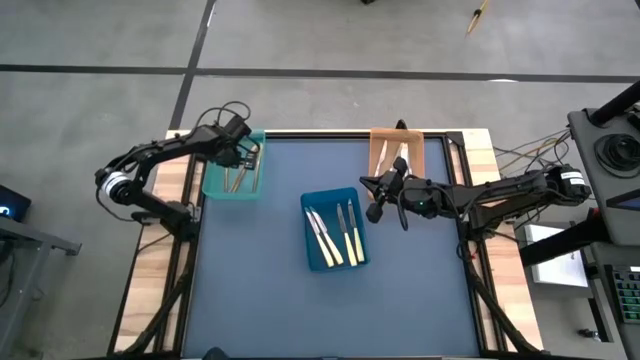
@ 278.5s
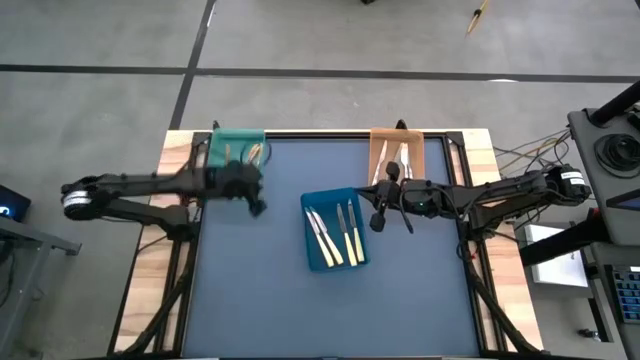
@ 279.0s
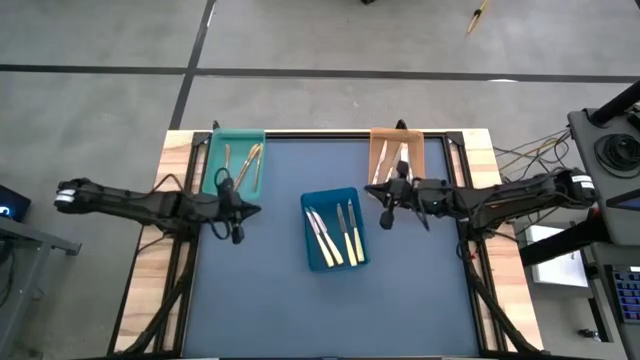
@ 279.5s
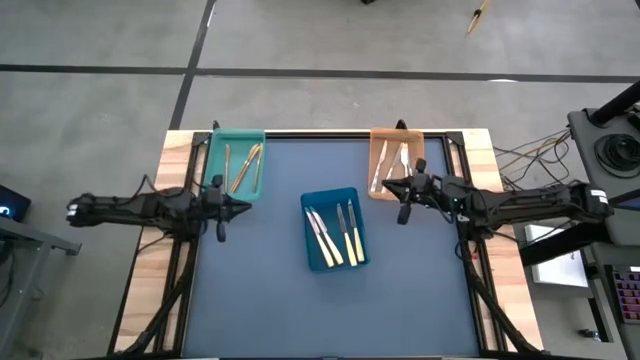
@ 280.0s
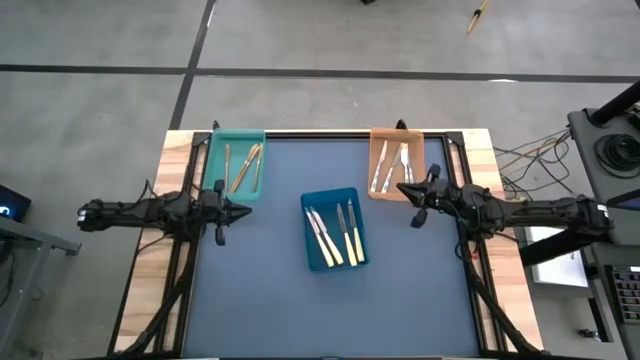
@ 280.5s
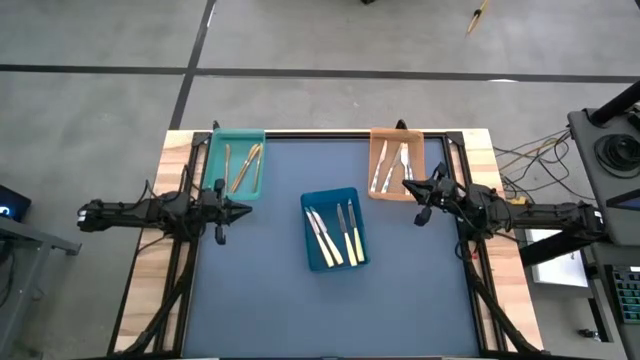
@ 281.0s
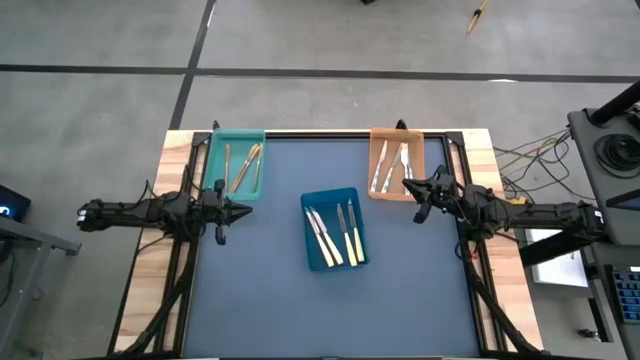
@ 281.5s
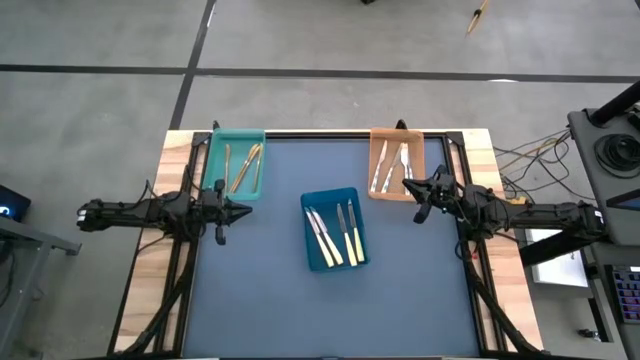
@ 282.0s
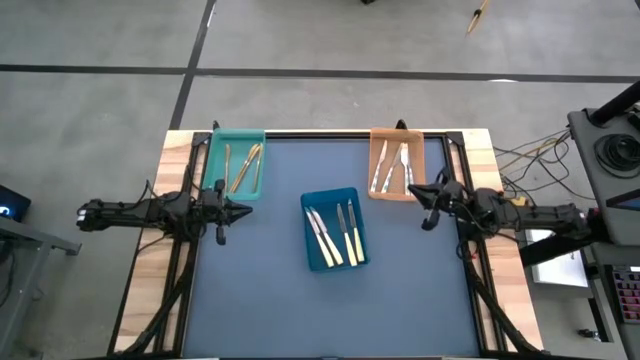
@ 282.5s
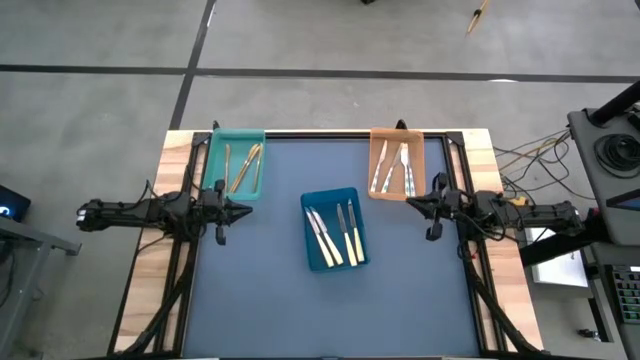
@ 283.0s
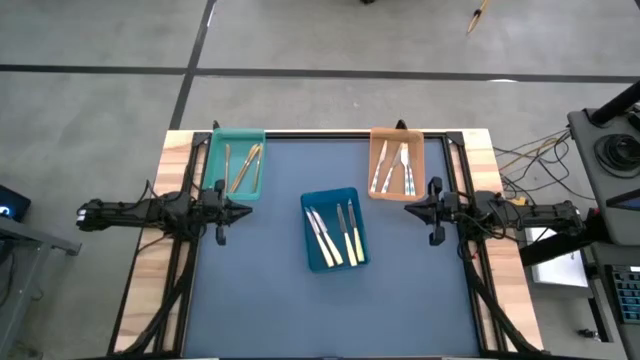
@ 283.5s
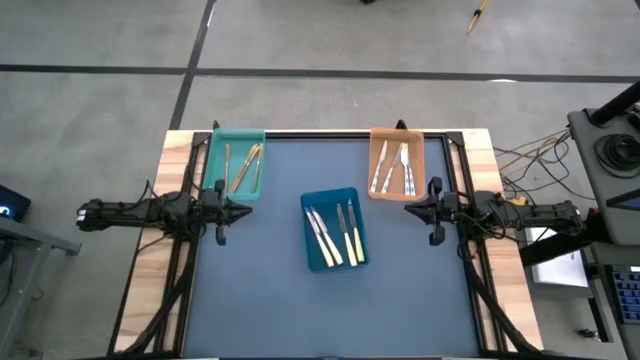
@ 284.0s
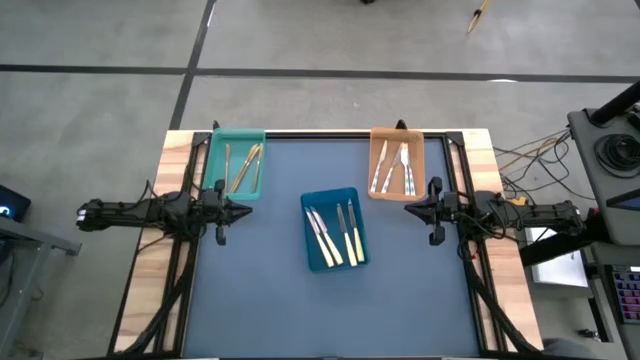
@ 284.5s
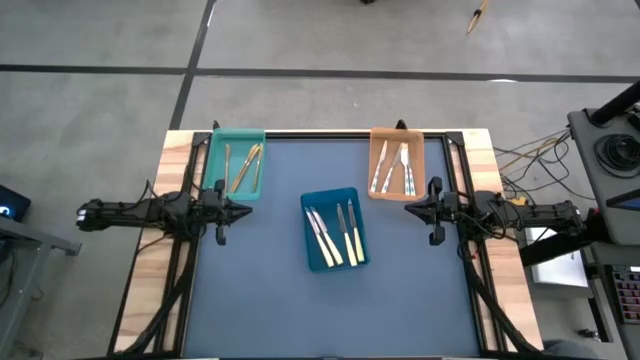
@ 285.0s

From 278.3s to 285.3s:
Task: Sort silverware by color (type)
Return to Home Position

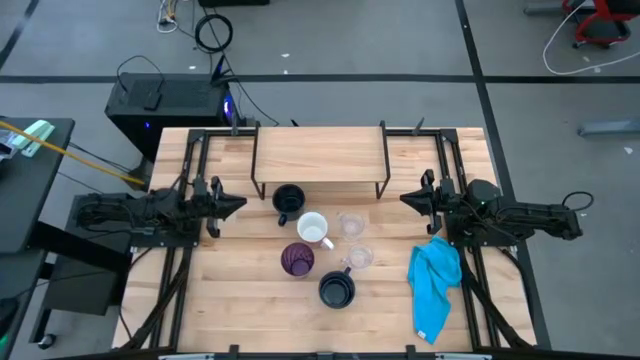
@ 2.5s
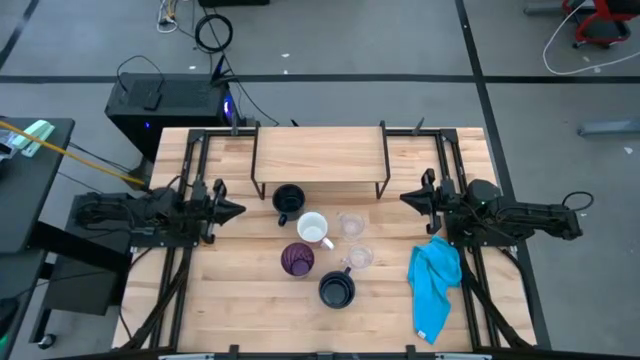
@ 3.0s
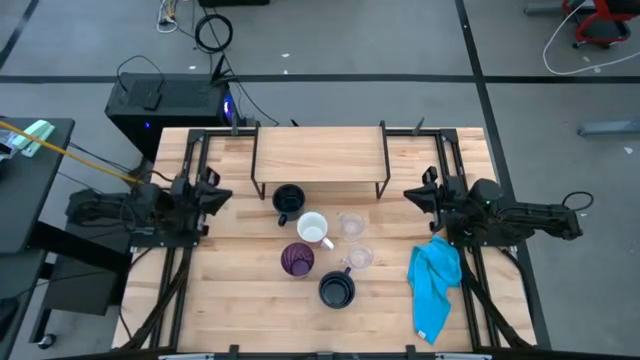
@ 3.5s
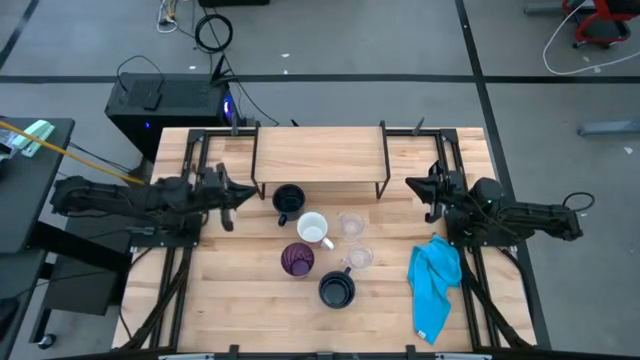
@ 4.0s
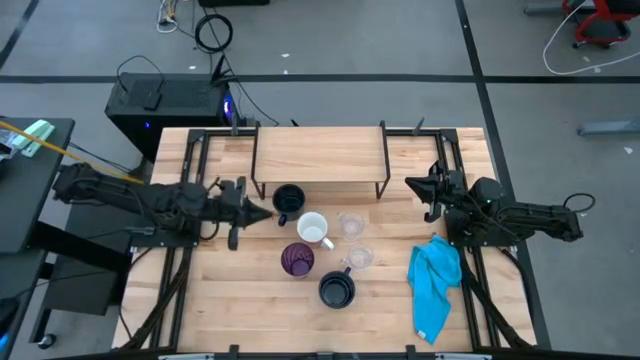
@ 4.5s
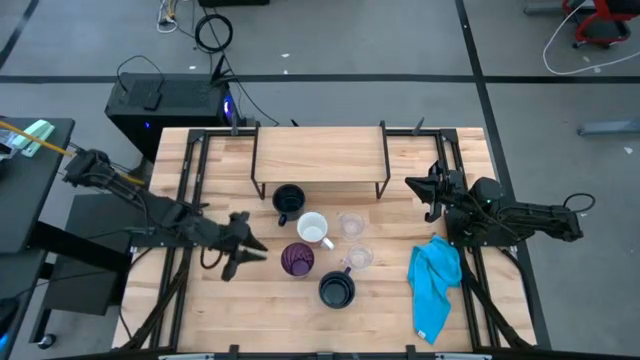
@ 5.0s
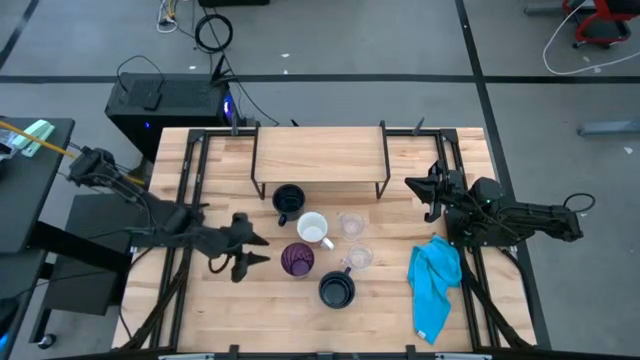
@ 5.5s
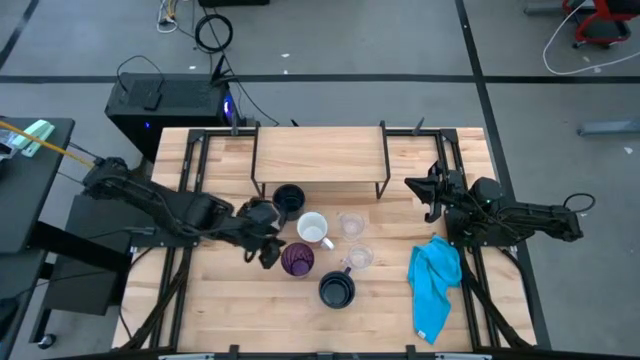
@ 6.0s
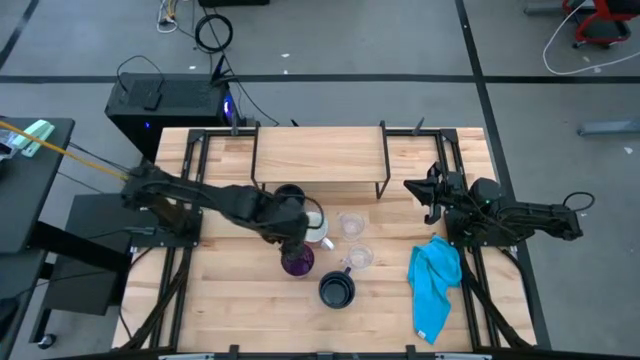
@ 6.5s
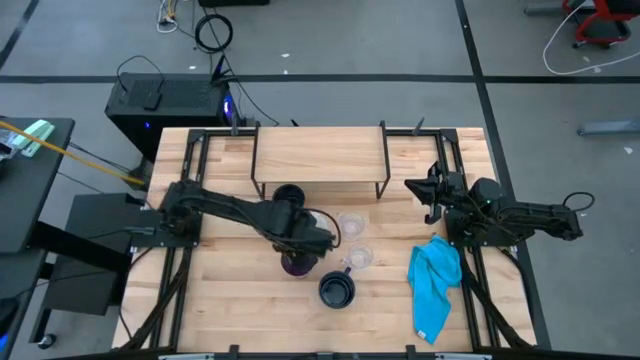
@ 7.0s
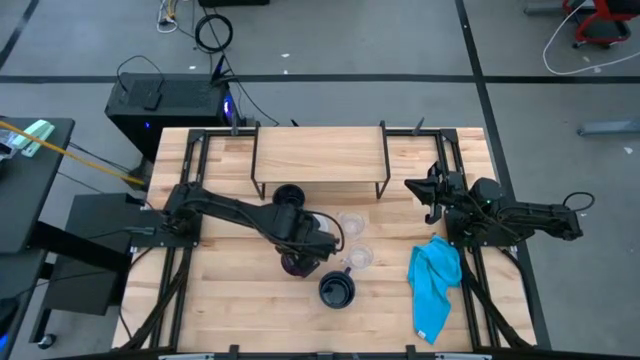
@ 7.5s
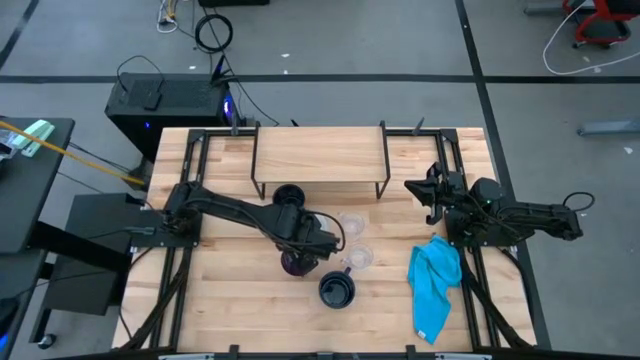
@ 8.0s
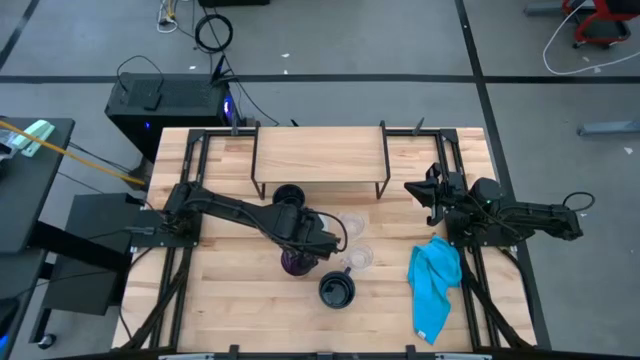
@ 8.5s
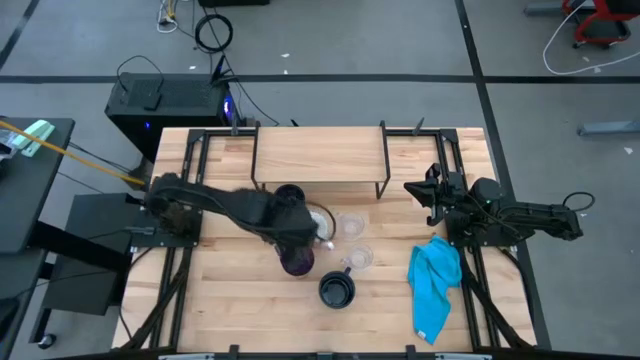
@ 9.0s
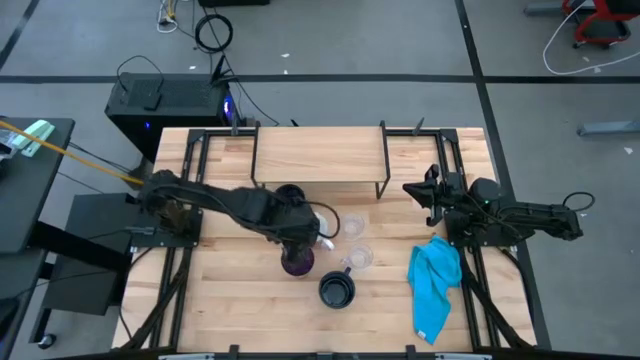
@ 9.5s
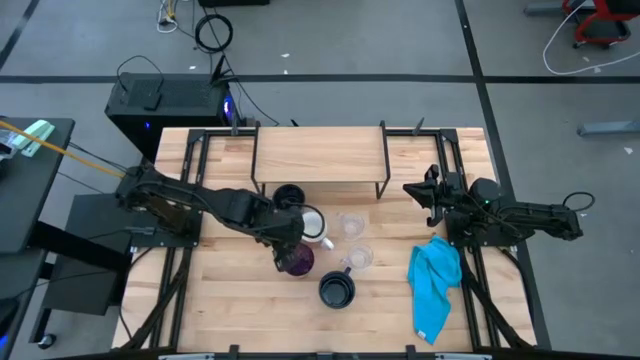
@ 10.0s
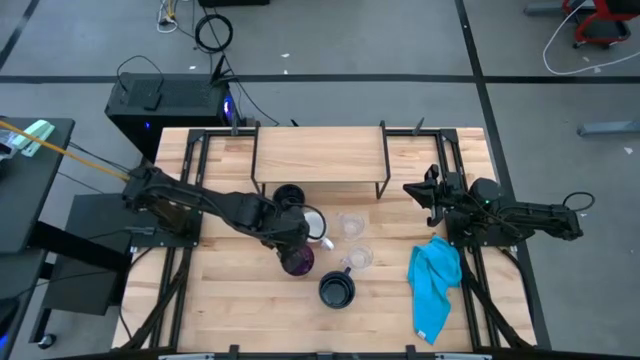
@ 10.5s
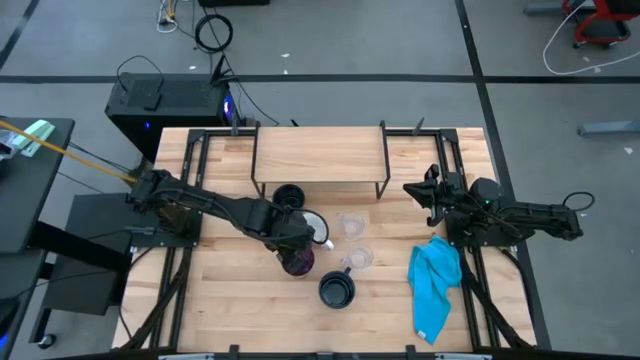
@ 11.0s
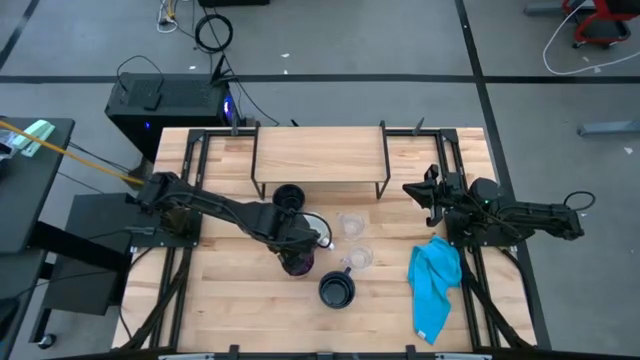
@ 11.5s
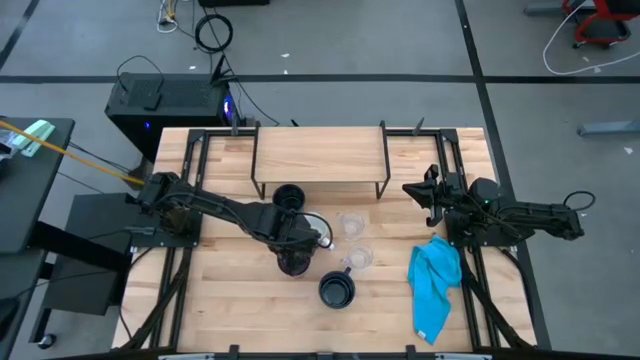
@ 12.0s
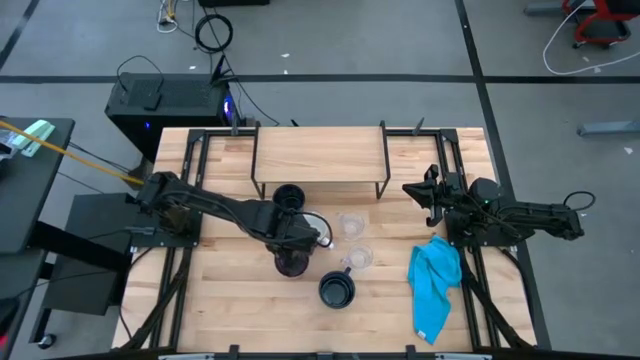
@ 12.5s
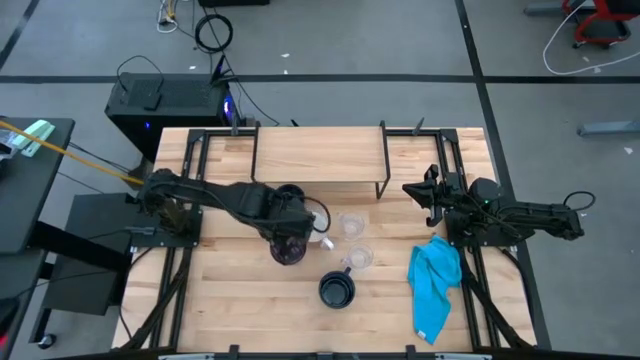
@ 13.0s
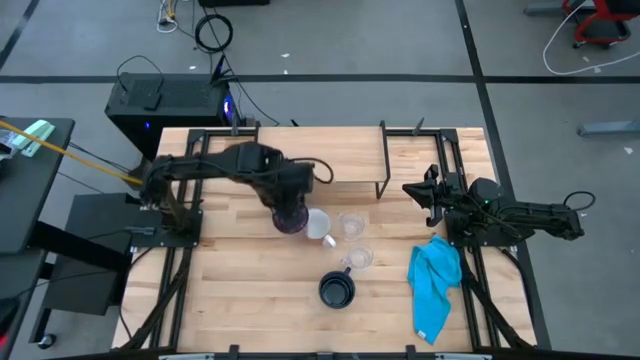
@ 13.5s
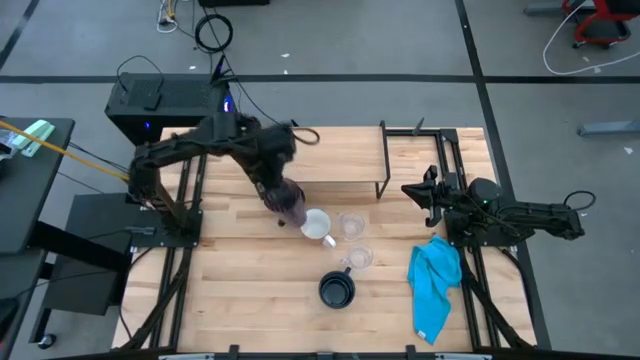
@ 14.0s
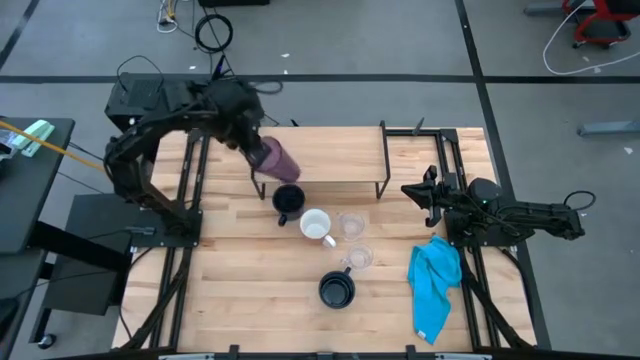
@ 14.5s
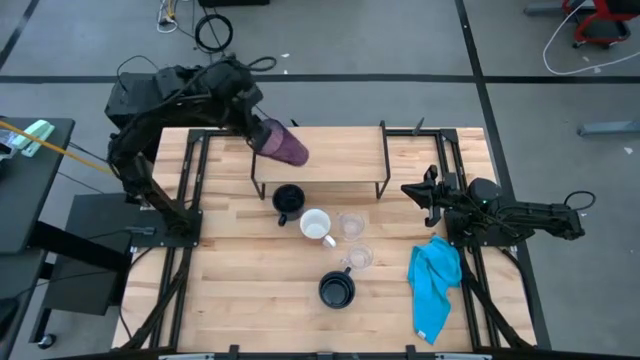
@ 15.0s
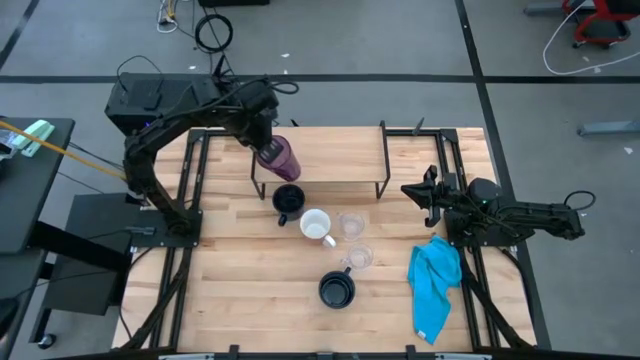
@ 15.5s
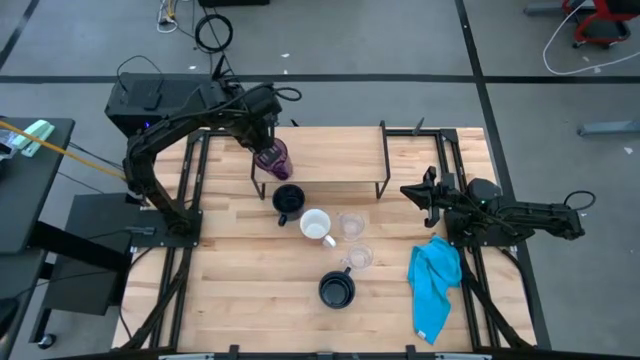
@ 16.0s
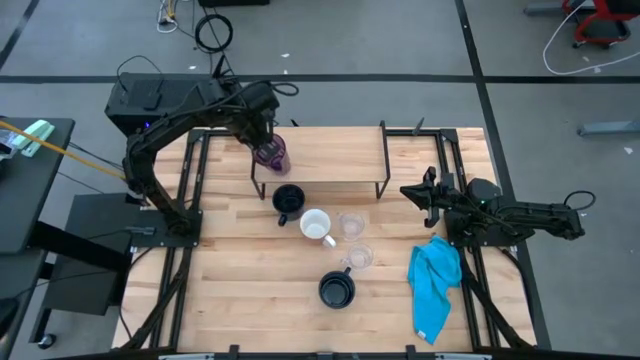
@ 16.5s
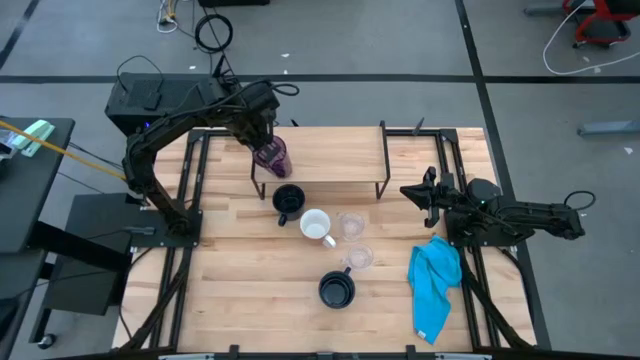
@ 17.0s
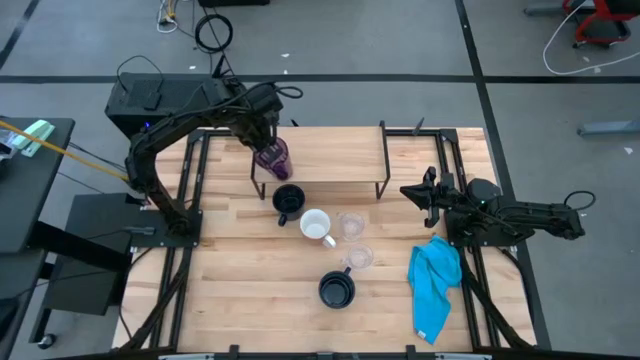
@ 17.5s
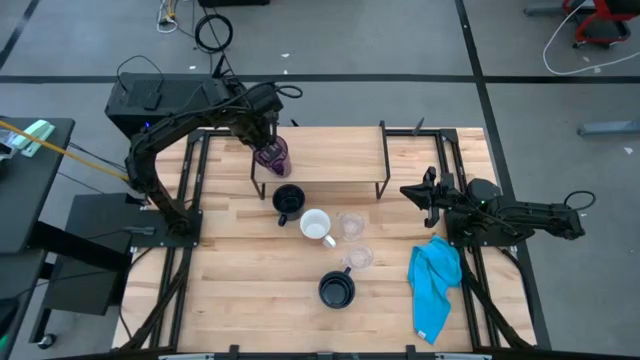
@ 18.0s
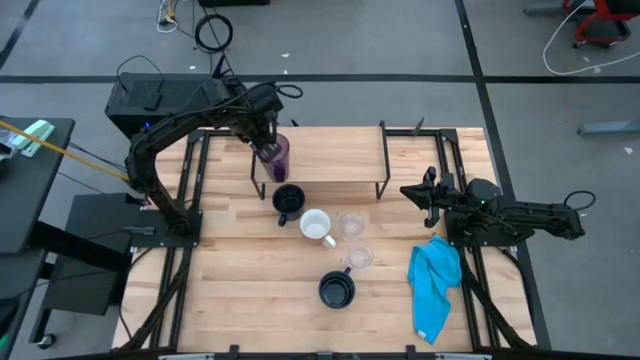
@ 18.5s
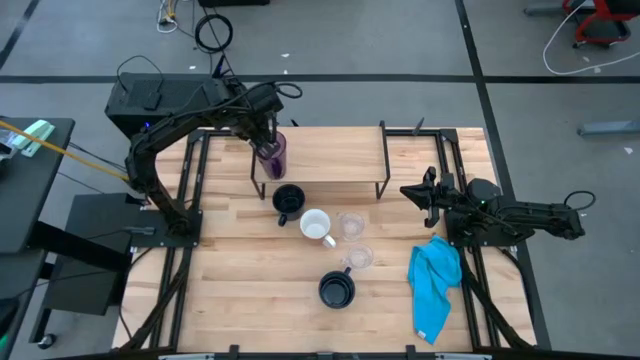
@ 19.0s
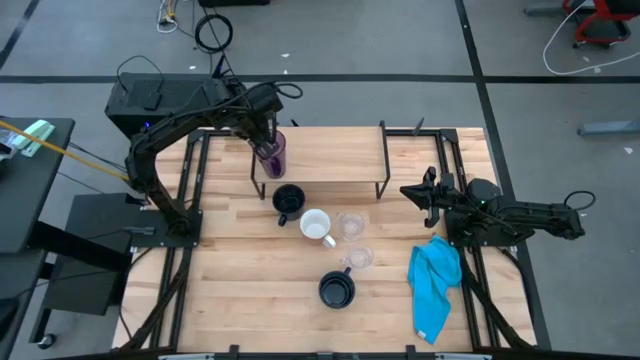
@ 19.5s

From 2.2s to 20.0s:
Task: Stack small to large cups/mugs on shelf
Put the purple cup on the shelf
